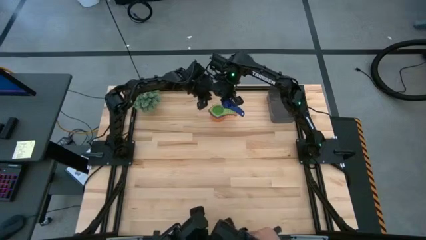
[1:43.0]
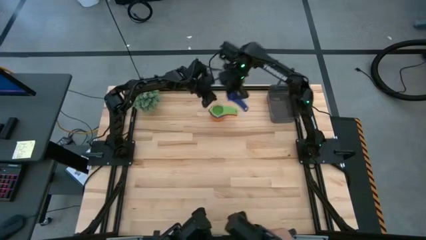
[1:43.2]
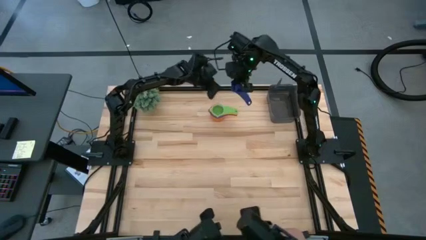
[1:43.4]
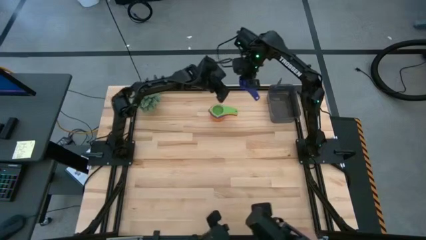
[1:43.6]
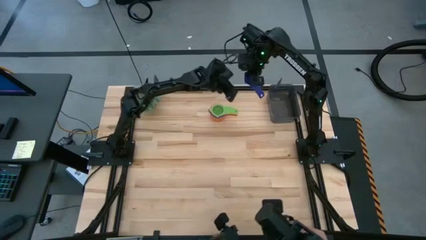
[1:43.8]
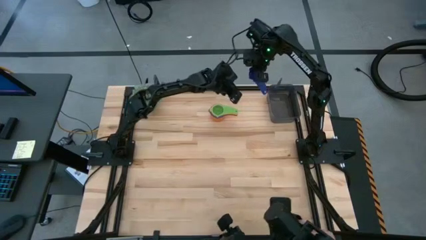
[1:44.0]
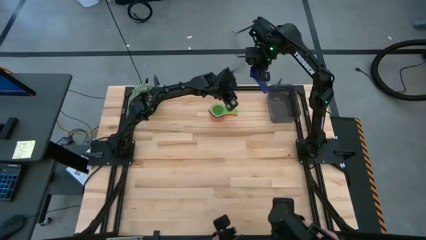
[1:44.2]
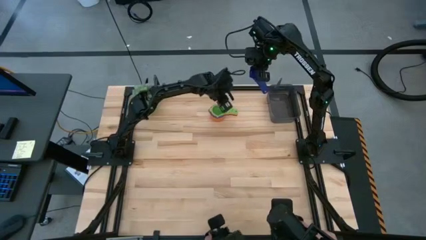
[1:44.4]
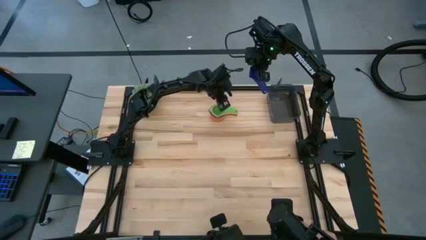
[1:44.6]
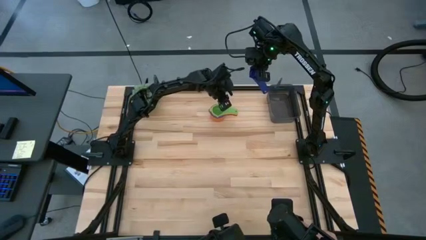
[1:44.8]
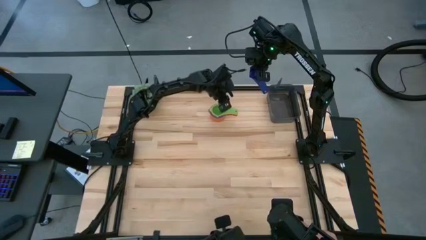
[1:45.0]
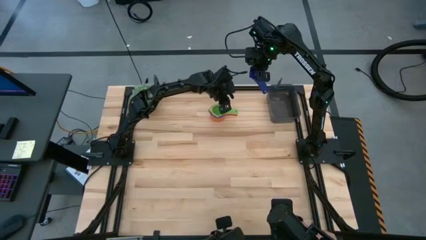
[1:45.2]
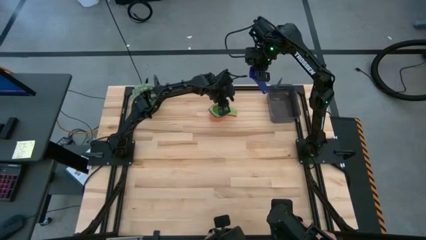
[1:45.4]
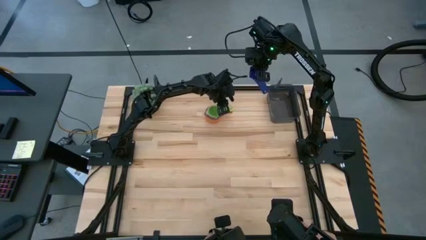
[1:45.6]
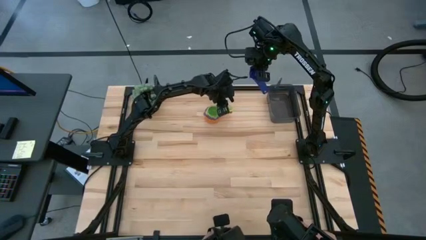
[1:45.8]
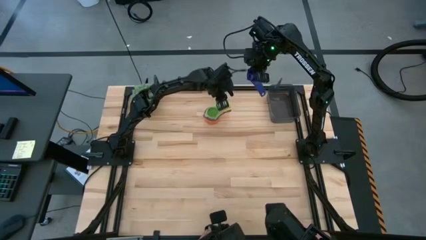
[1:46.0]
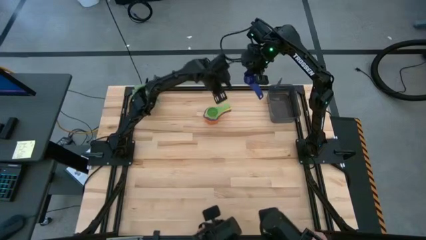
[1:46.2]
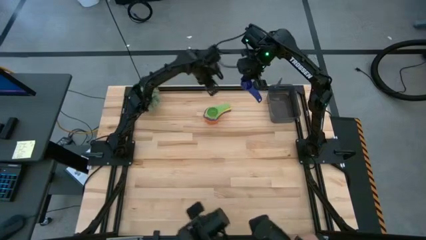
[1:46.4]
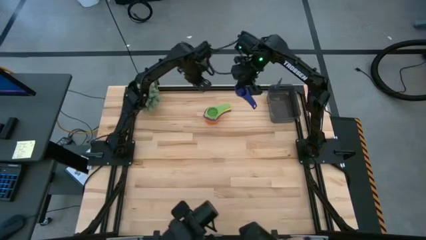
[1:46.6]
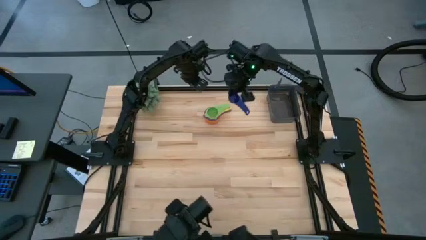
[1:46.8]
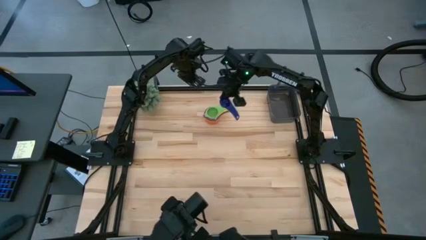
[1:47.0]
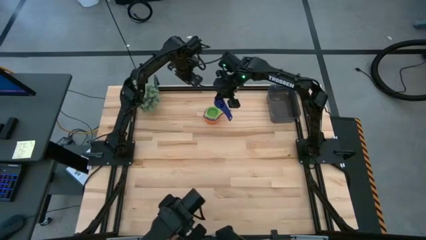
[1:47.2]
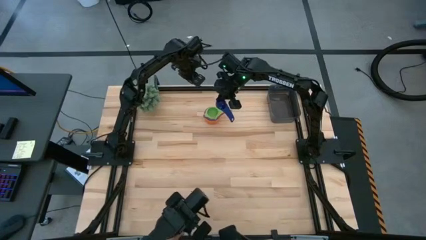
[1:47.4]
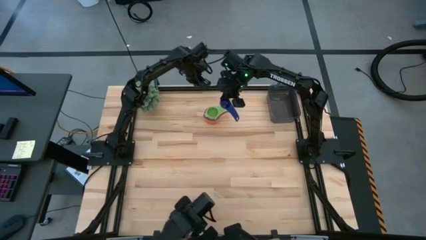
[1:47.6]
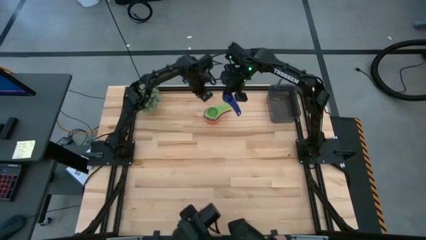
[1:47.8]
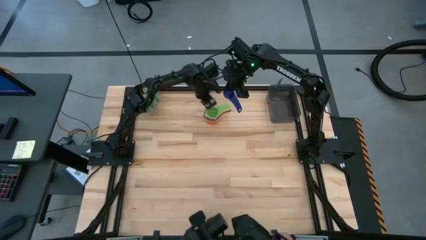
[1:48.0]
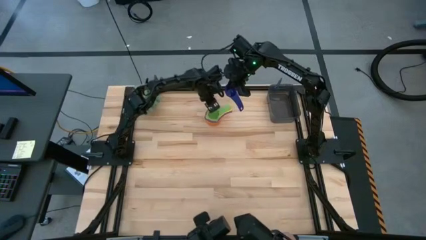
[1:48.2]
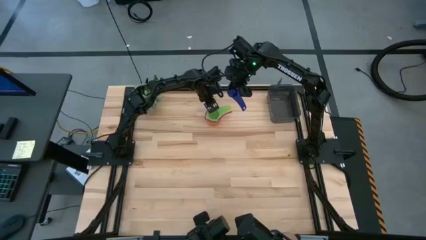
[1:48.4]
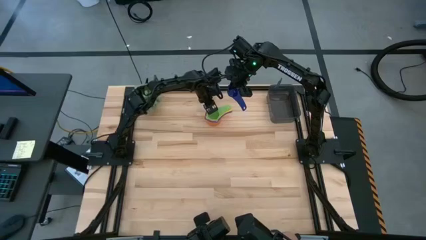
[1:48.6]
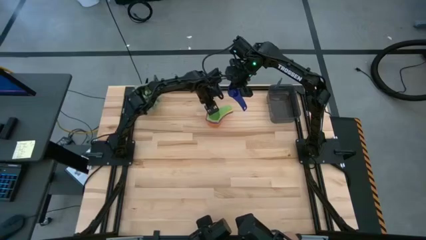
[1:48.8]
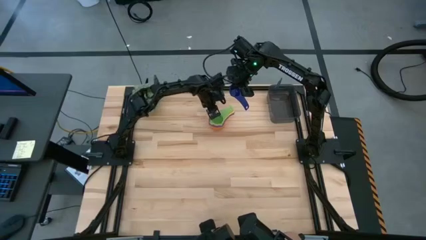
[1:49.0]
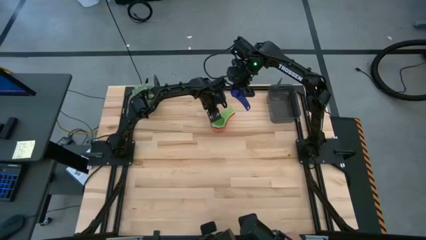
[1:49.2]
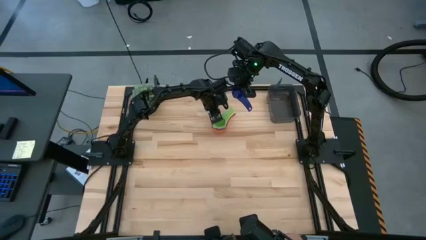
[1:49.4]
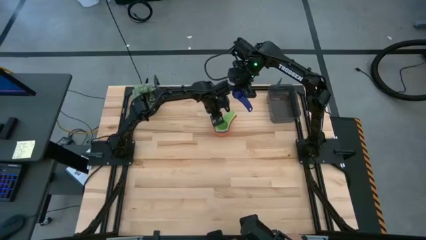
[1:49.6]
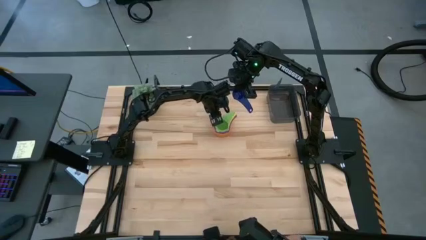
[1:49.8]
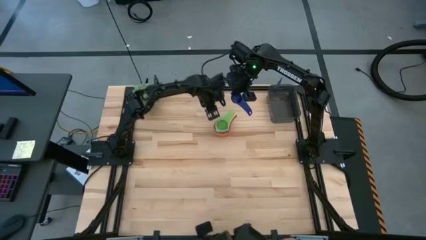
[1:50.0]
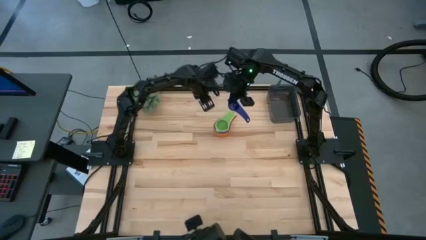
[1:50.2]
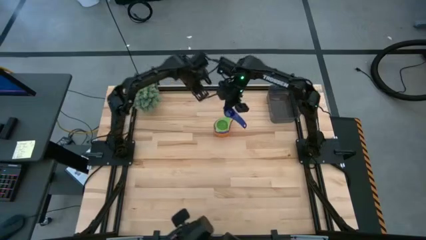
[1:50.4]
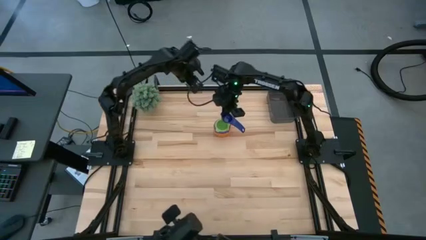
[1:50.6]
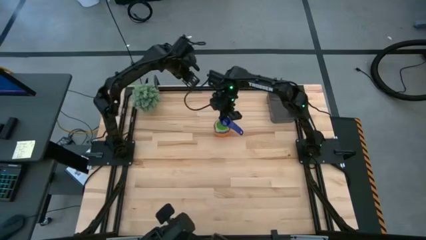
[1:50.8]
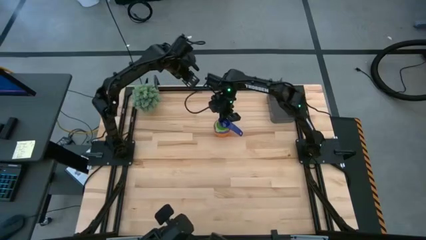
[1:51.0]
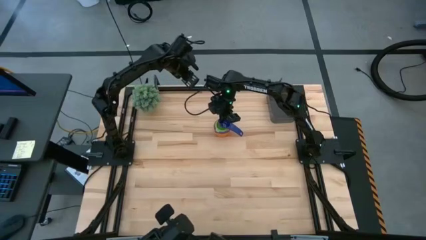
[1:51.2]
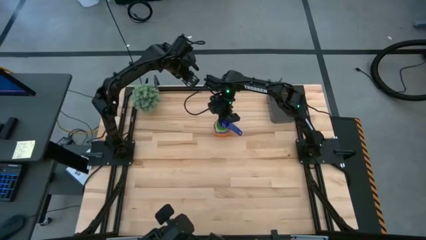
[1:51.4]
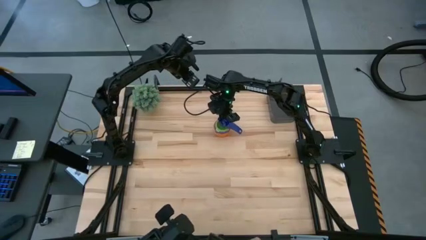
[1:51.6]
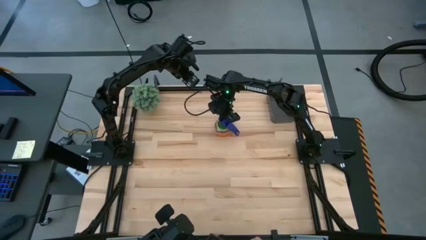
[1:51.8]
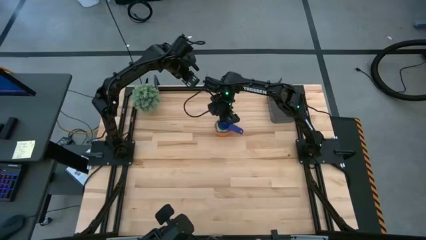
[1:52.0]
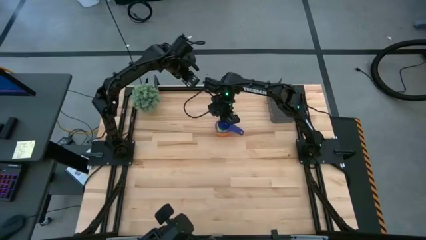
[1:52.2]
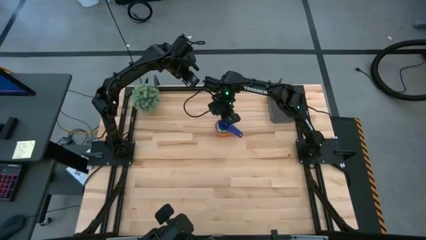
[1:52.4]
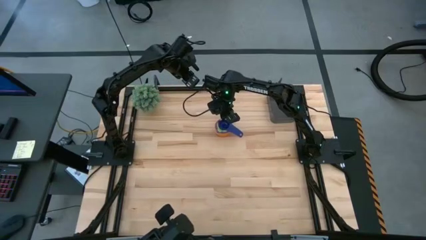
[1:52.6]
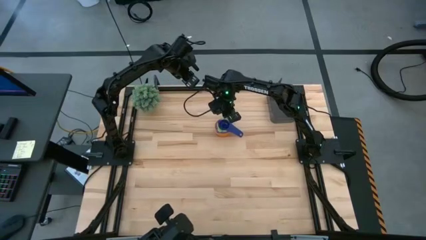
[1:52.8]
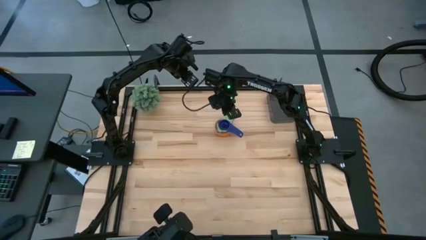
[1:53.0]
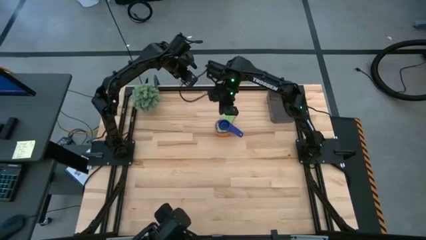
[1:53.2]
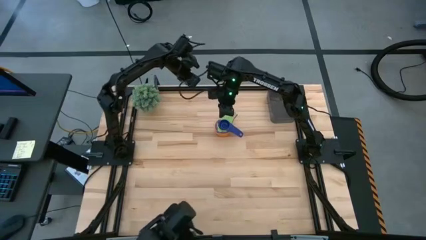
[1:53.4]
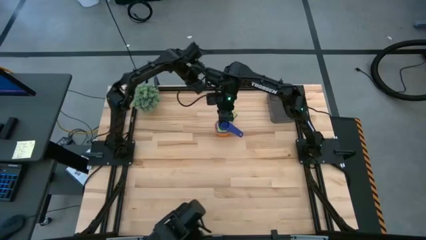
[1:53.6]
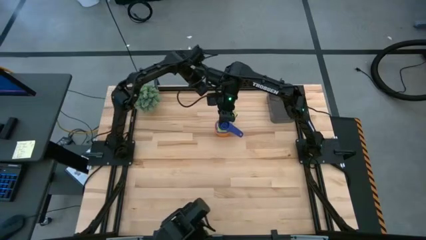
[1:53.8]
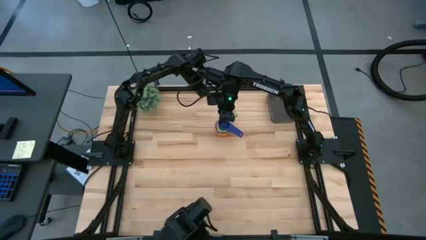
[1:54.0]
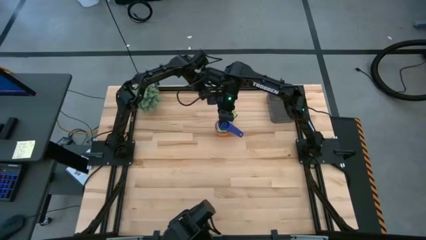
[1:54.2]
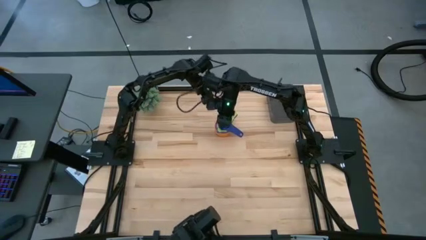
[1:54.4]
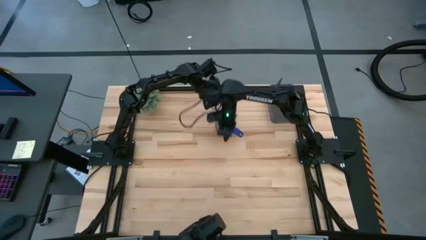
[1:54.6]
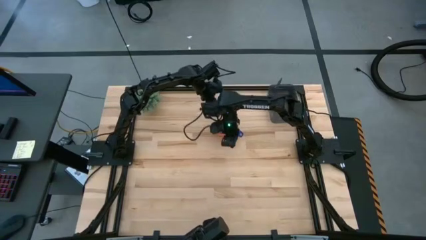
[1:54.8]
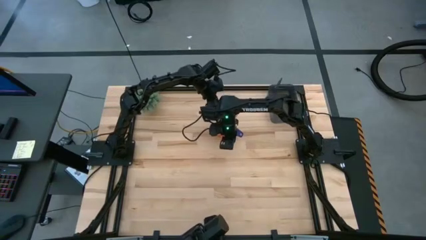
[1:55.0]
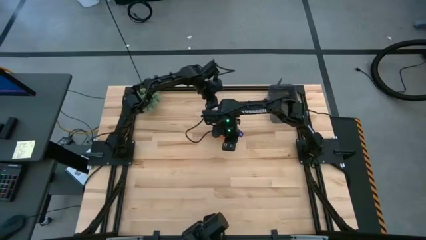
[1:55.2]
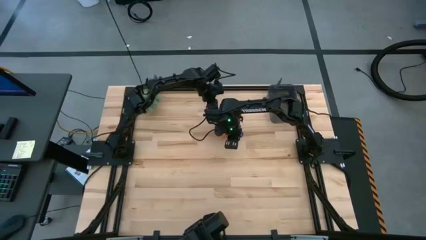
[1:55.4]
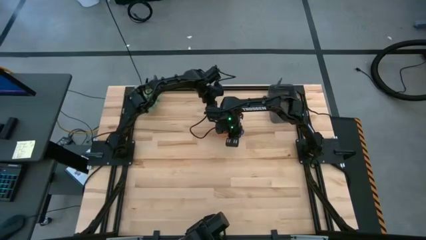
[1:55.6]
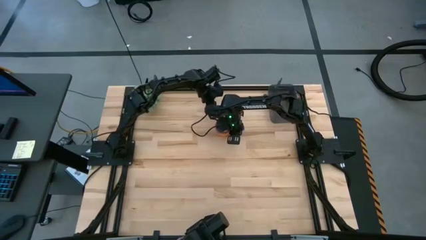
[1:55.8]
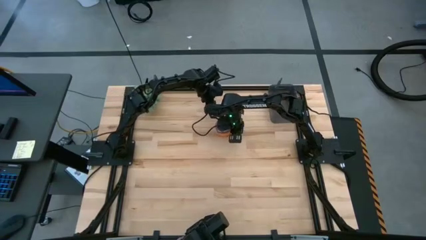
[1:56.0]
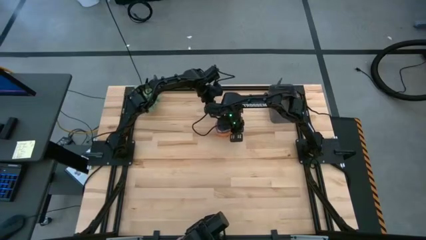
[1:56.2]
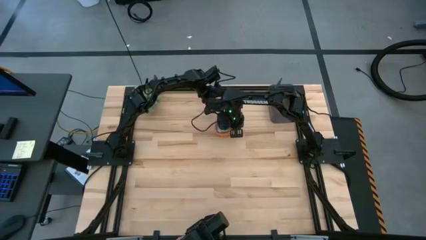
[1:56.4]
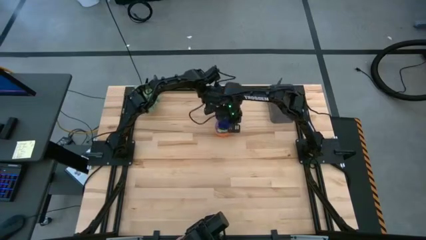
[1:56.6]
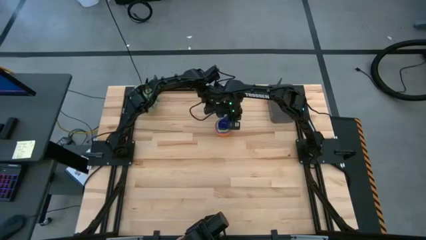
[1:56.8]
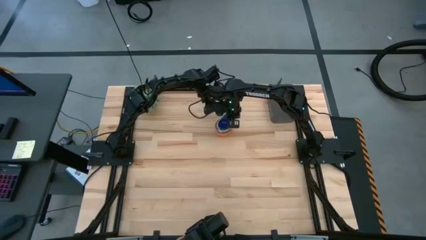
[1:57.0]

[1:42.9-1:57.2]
Task: Nest measuring cups in basket
Stack the dark blue measuring cup on the stacked green measuring cup

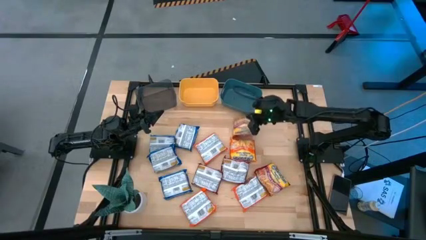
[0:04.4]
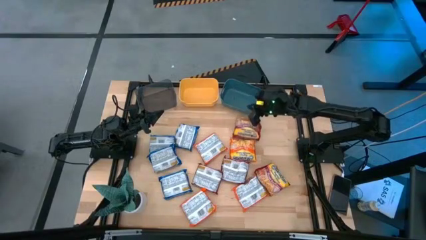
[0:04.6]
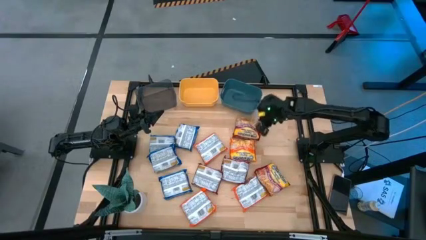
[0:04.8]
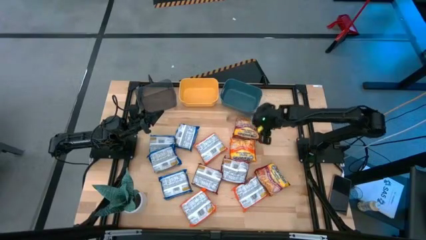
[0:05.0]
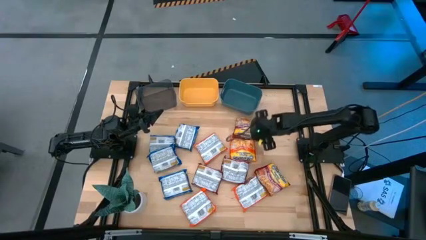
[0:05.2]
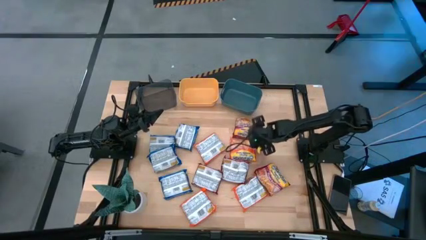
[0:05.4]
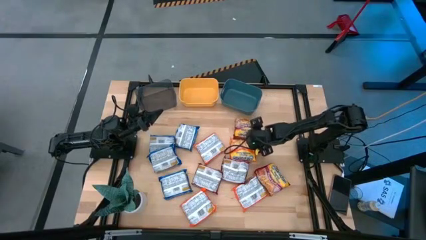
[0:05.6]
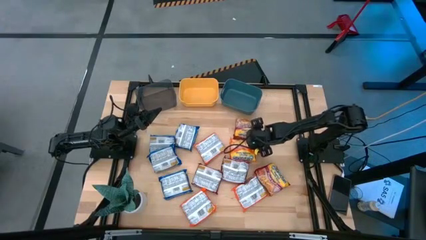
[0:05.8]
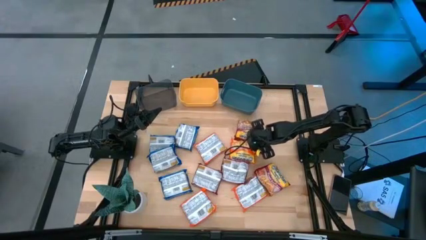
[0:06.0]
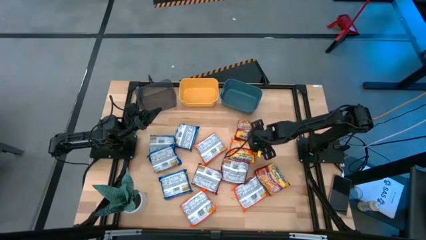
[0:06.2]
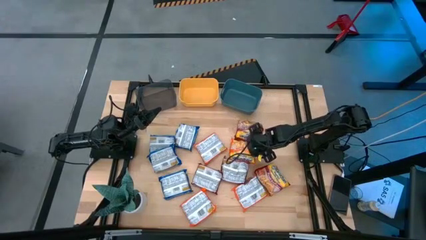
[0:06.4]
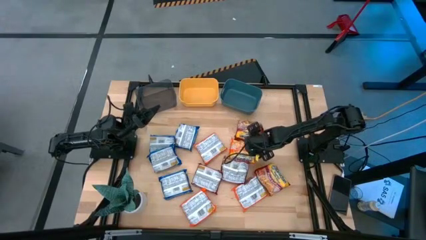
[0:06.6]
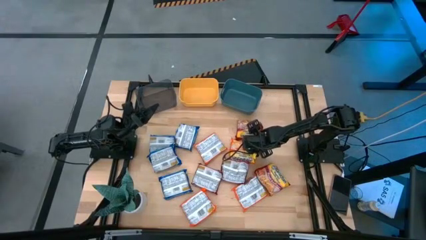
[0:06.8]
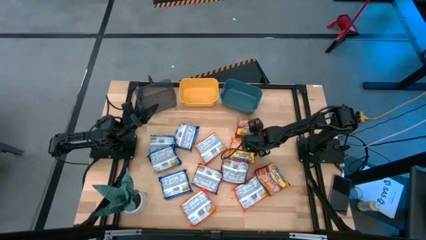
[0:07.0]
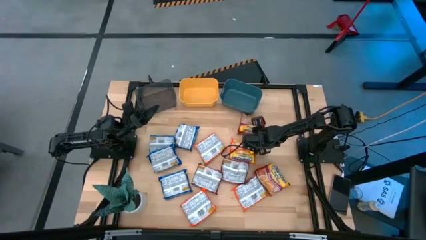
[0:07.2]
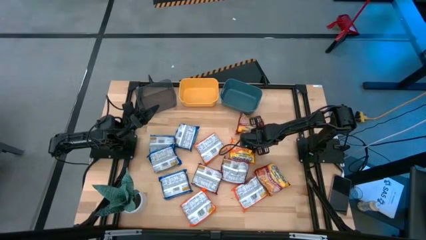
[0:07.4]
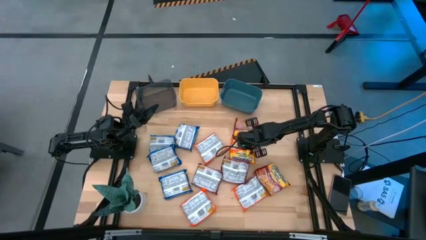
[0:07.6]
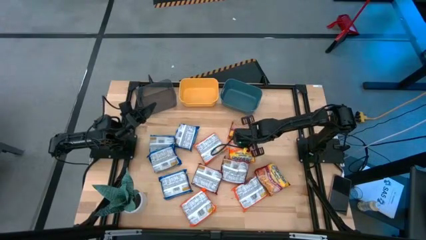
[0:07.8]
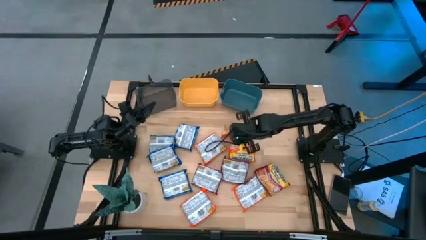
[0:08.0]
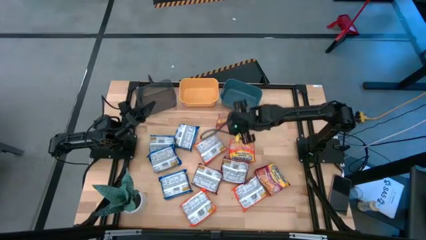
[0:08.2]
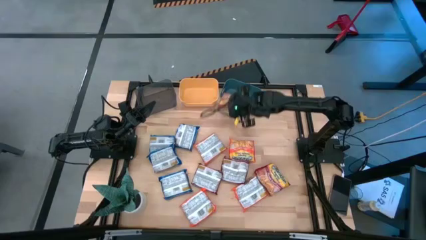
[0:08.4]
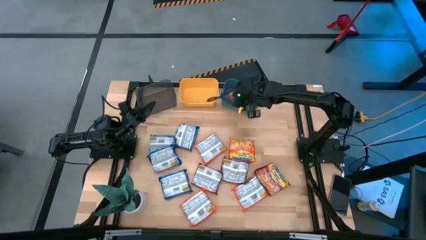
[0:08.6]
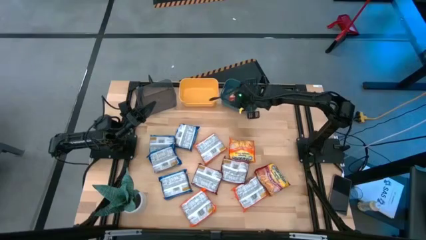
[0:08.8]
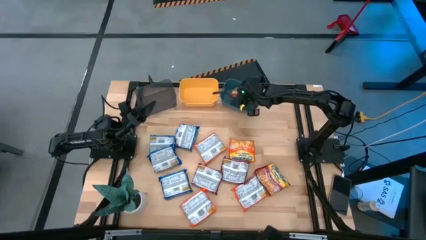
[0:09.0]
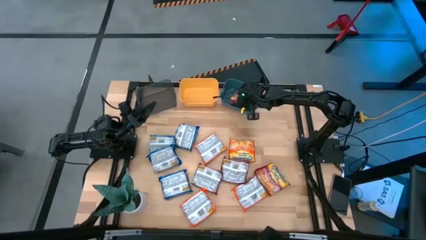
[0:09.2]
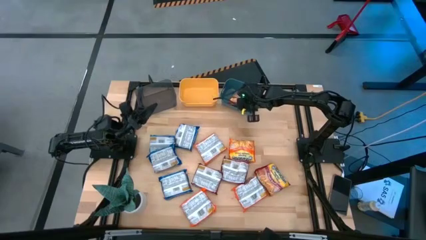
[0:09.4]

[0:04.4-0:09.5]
Task: Sort Maruchan noodles
Put the red noodle pack into the blue bin
